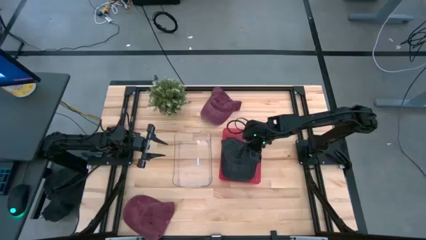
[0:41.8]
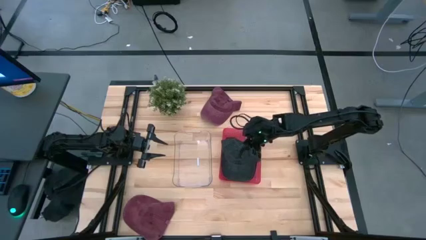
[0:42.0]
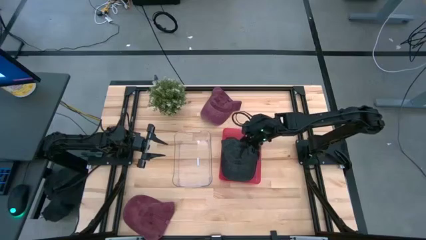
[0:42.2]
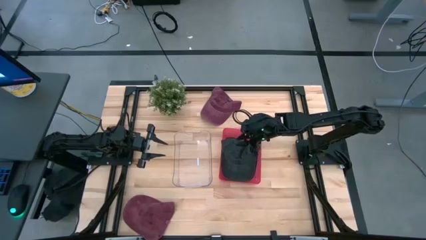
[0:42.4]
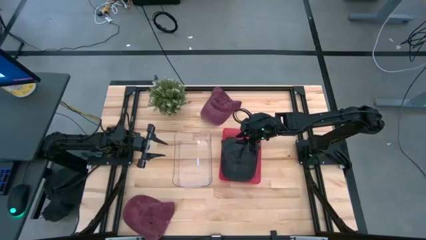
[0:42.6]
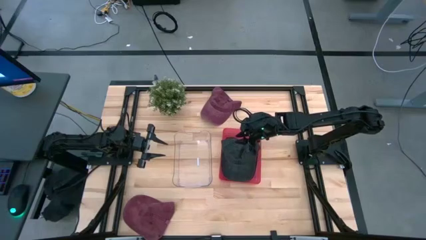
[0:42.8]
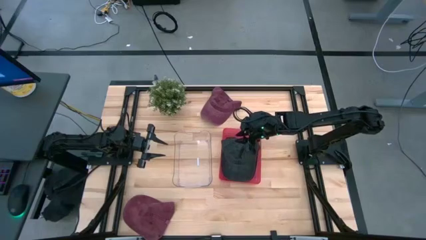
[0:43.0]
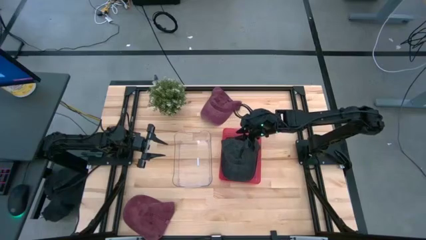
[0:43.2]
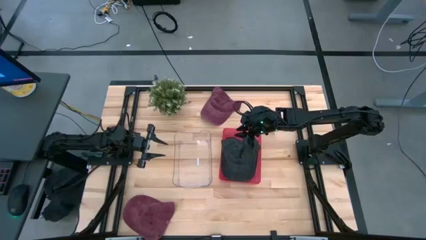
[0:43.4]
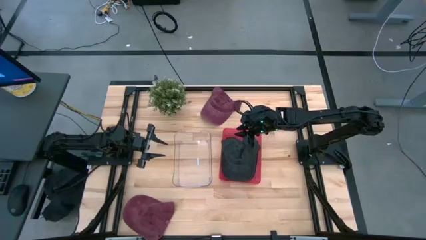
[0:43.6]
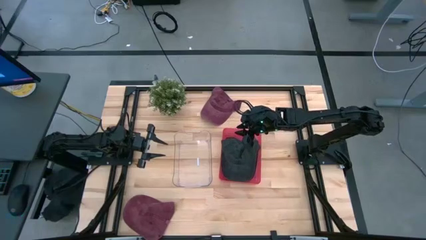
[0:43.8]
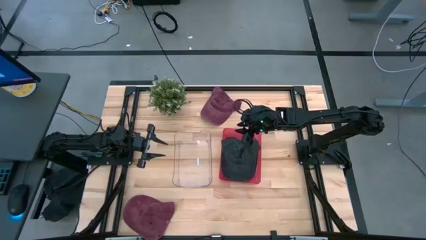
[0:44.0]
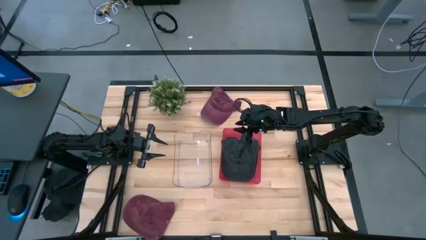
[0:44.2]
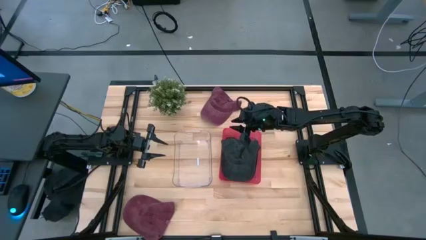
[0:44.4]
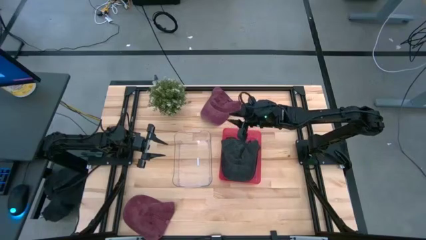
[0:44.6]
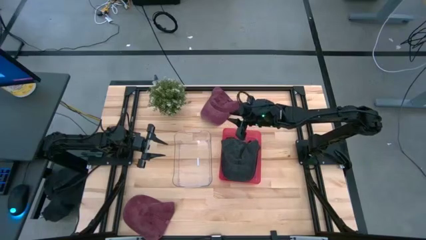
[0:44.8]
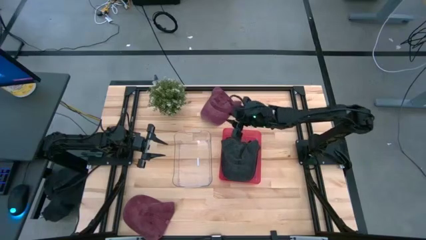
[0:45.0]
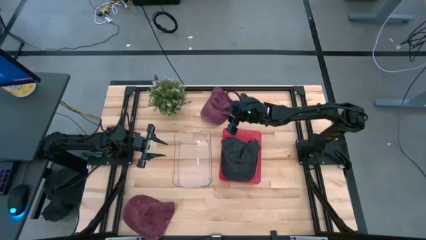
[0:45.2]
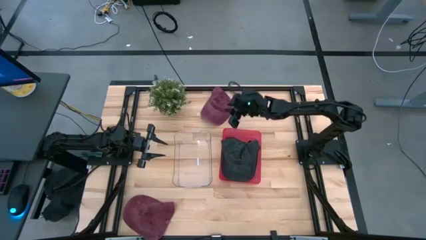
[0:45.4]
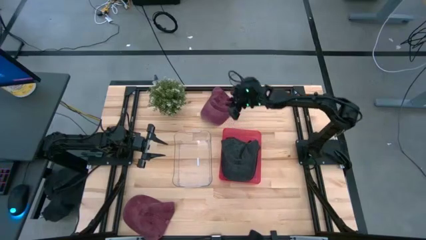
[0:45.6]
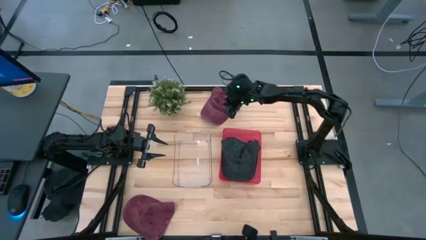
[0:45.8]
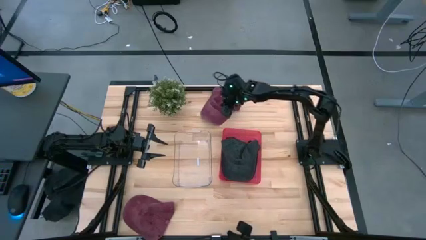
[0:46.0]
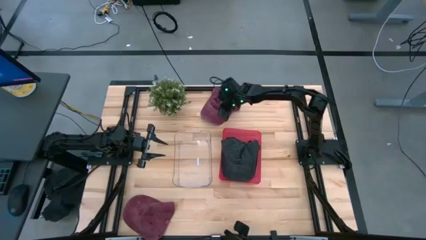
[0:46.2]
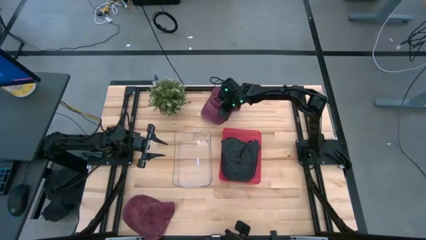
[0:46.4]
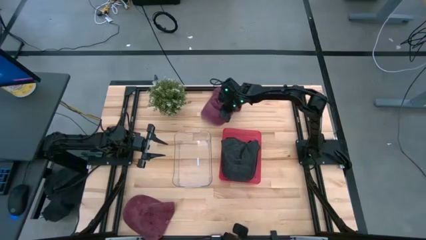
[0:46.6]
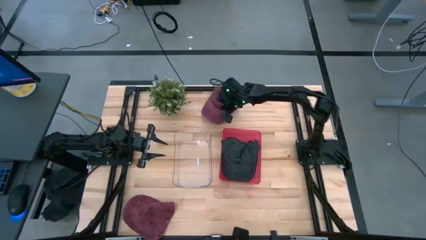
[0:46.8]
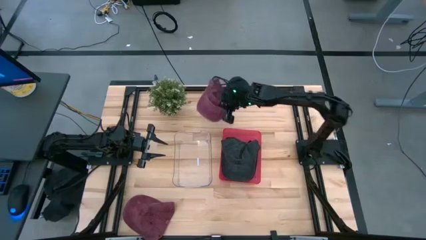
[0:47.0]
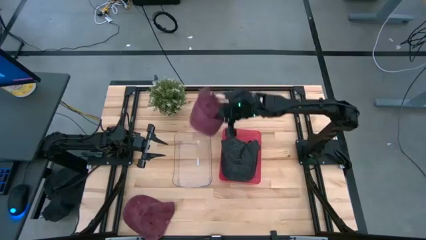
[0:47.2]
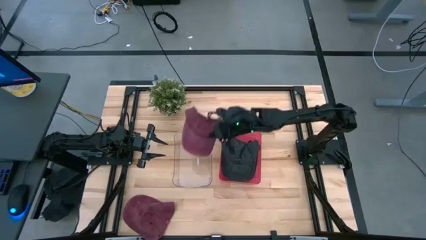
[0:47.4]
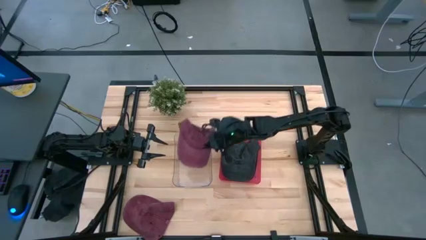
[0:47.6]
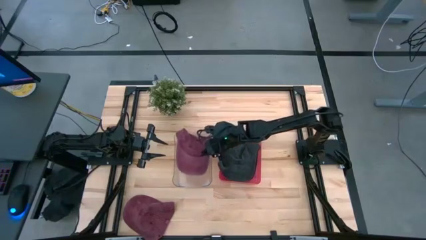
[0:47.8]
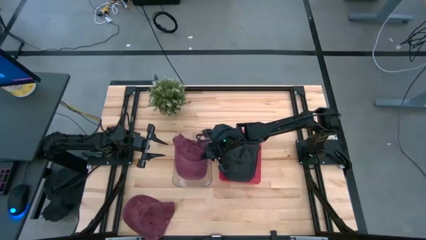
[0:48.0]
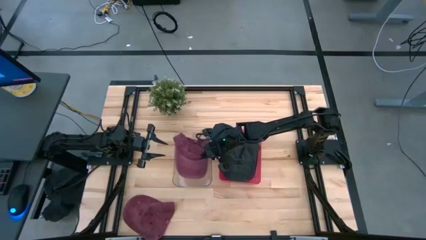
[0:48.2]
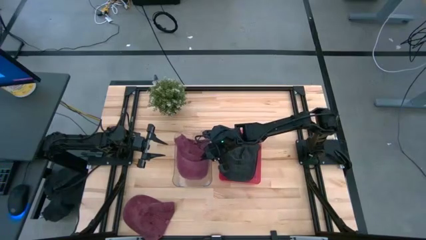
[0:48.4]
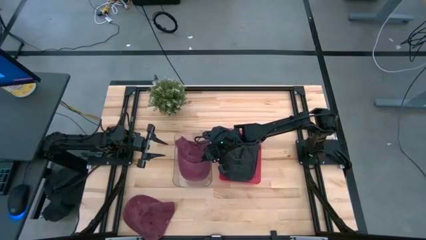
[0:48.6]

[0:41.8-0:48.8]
Task: Pick & Place hat
Put the top red cap in the transparent bin

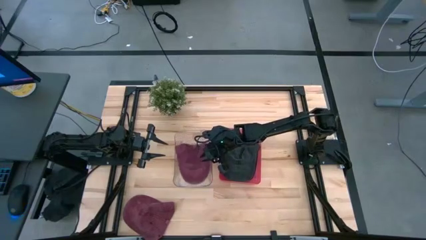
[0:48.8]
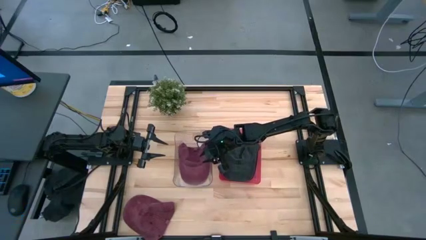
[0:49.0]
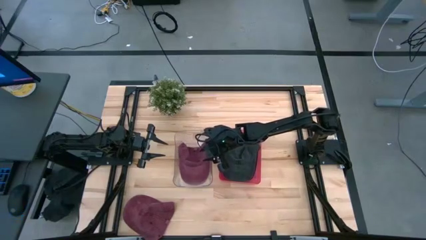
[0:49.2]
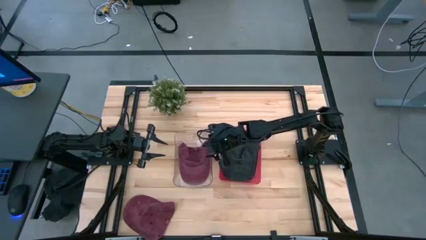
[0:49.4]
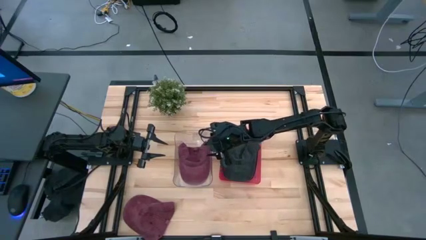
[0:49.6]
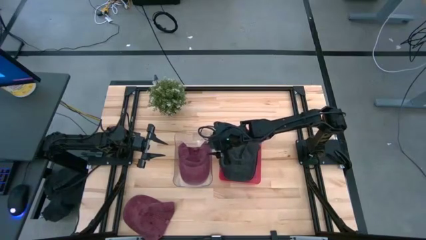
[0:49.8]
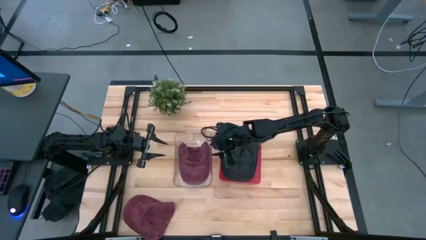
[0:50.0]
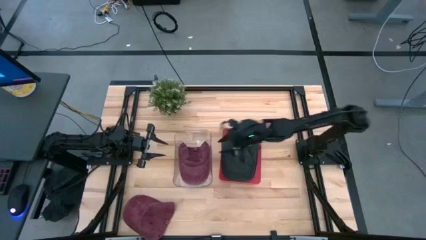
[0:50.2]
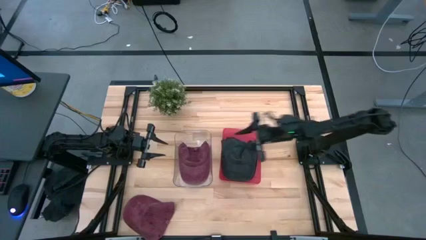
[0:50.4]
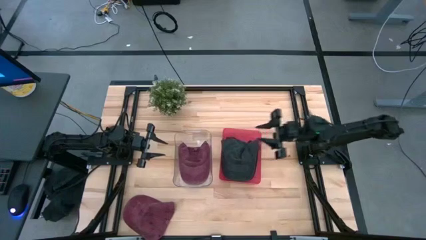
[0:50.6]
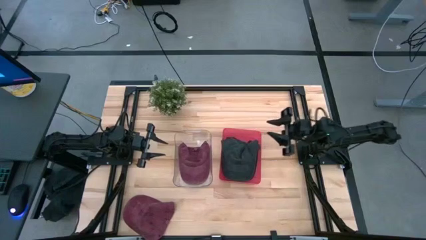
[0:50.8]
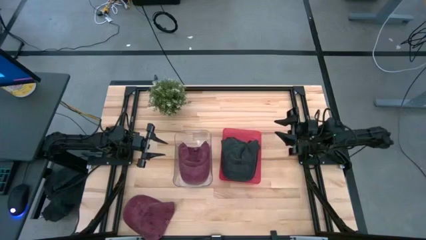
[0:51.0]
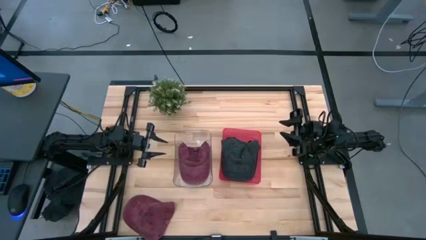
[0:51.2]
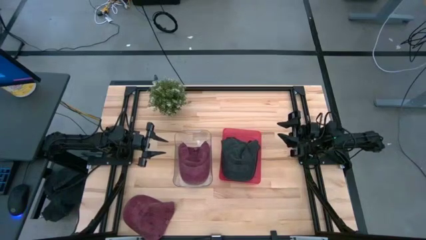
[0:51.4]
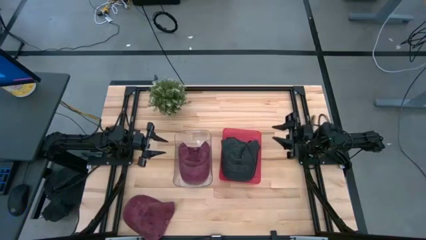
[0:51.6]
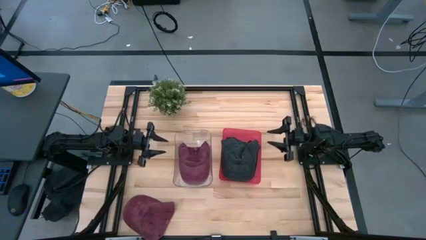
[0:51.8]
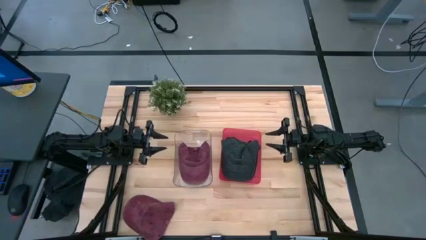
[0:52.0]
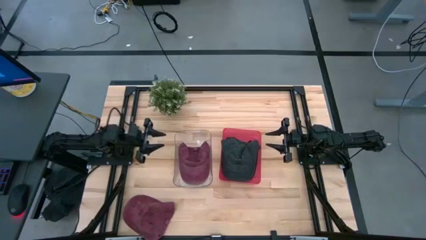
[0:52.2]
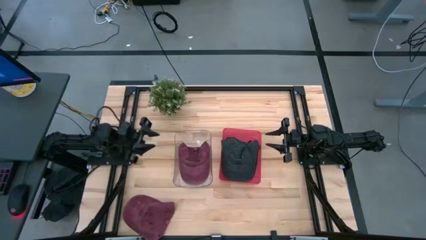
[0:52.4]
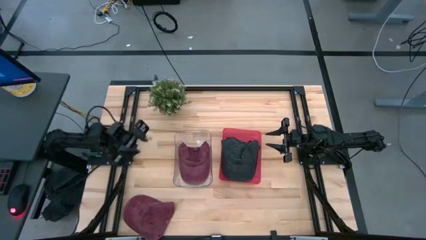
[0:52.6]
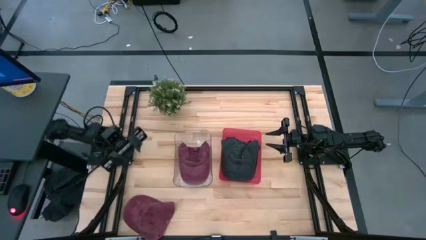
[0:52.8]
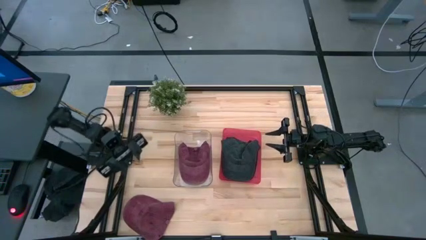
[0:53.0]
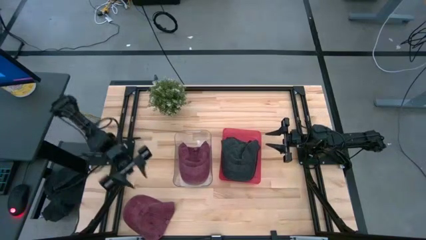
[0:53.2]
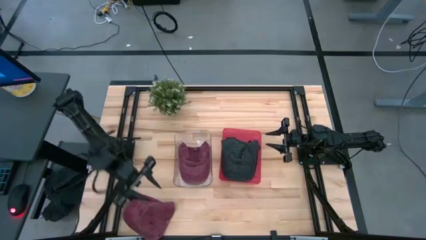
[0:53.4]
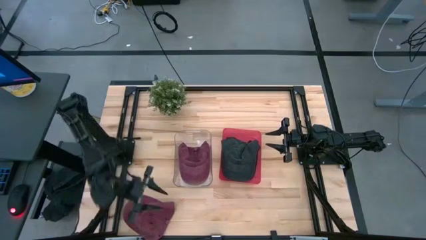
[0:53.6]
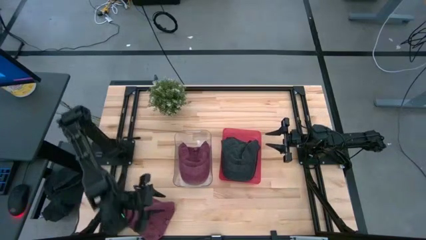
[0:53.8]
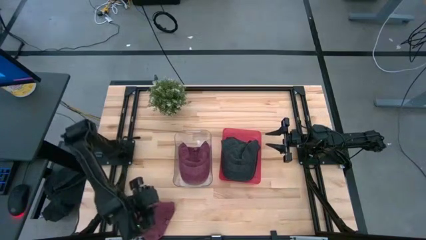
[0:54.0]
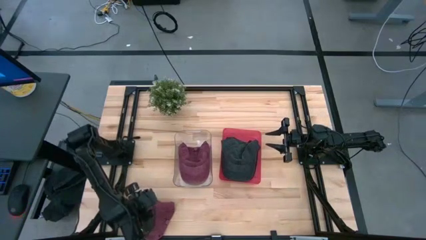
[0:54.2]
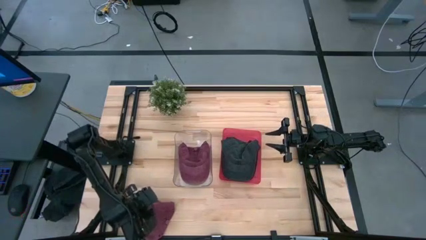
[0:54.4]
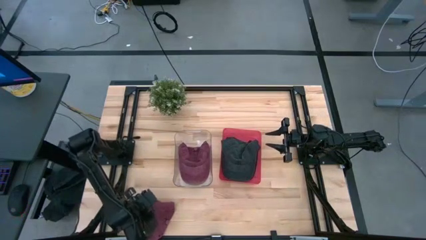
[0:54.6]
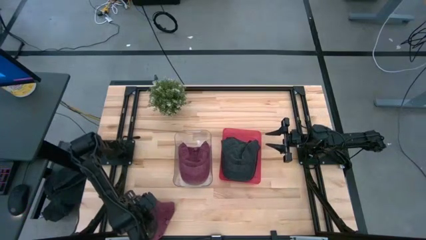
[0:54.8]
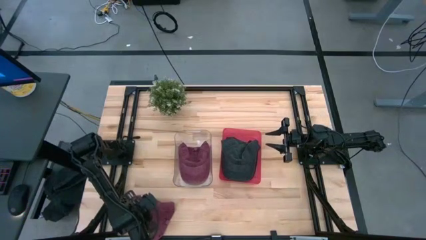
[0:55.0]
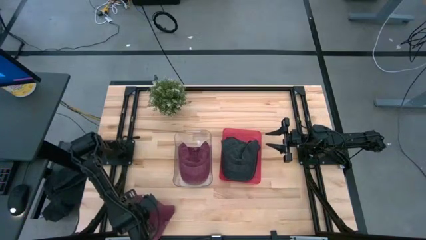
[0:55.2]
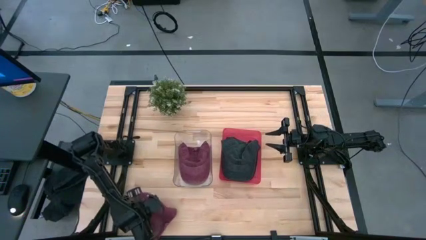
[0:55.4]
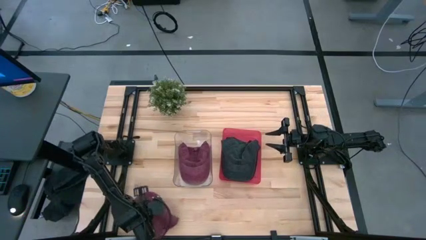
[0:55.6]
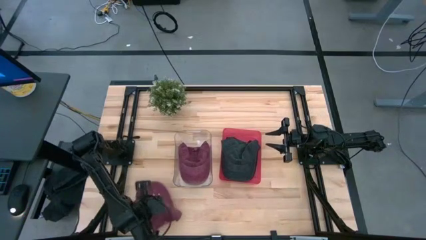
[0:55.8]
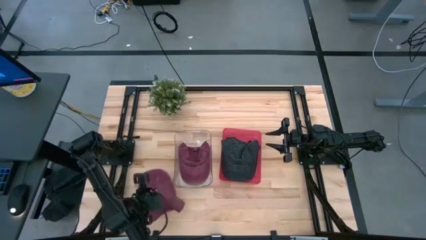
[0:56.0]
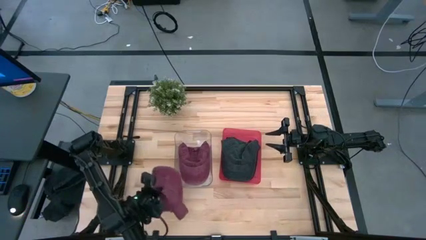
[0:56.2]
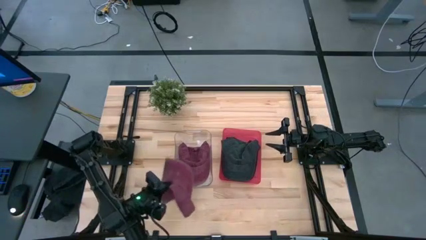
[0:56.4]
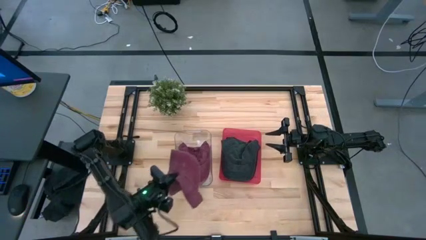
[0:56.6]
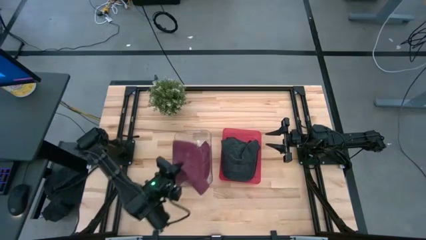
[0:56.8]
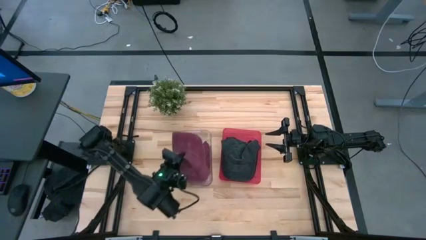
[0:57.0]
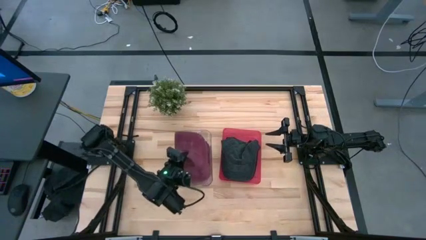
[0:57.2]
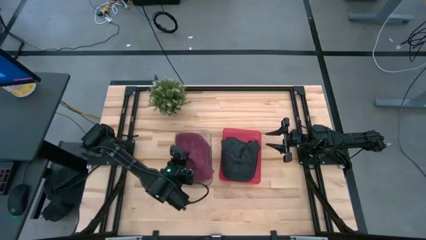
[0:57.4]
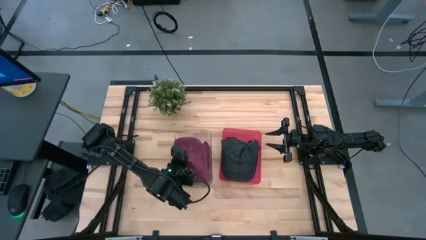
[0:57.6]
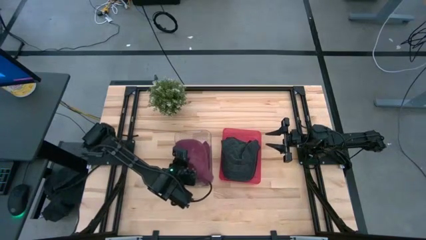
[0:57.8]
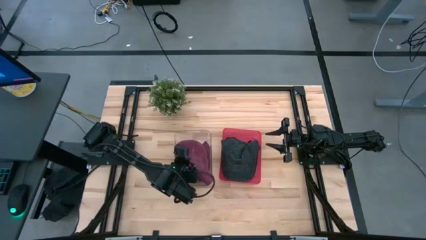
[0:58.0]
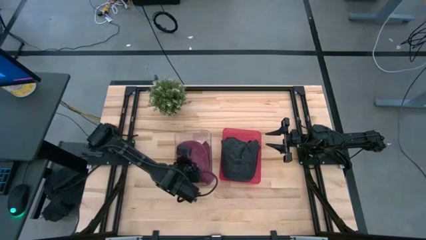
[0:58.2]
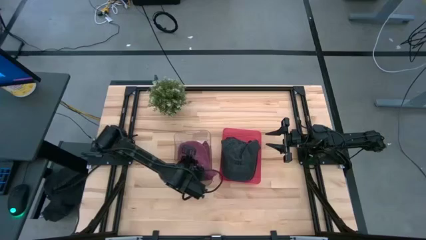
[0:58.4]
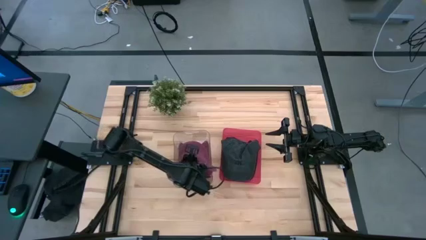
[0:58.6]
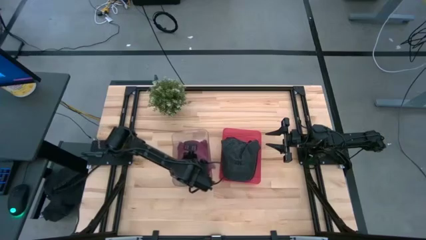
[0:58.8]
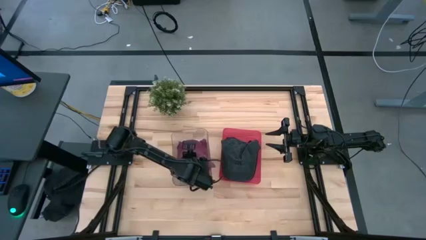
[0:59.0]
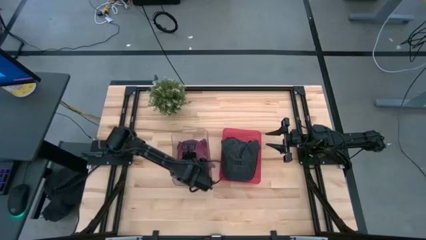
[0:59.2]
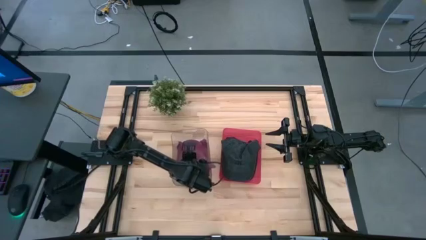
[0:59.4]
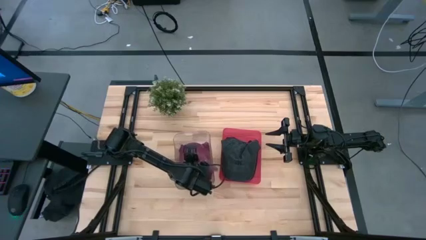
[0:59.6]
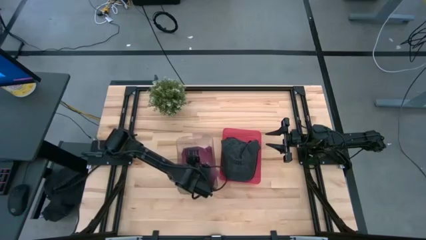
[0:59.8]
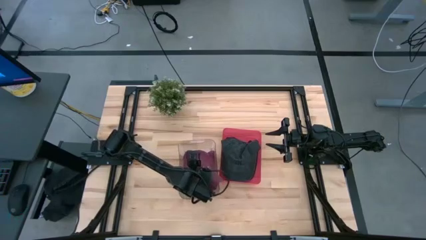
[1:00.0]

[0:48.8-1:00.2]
Stack the red cap on top of the red cap in the transparent bin
